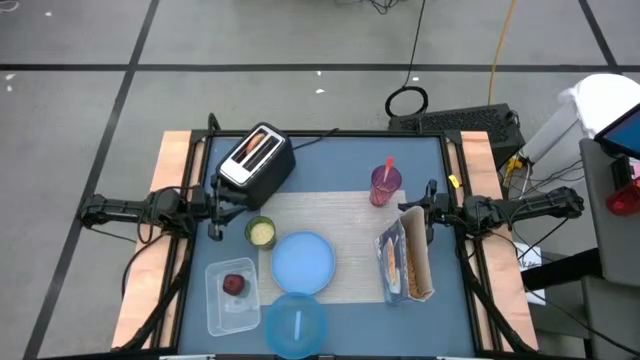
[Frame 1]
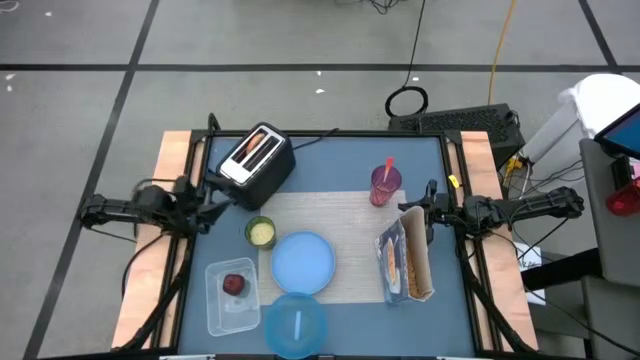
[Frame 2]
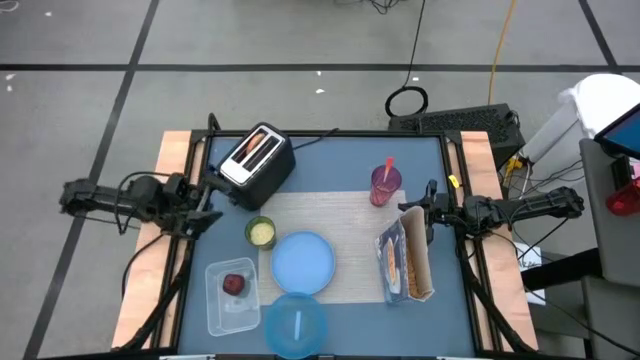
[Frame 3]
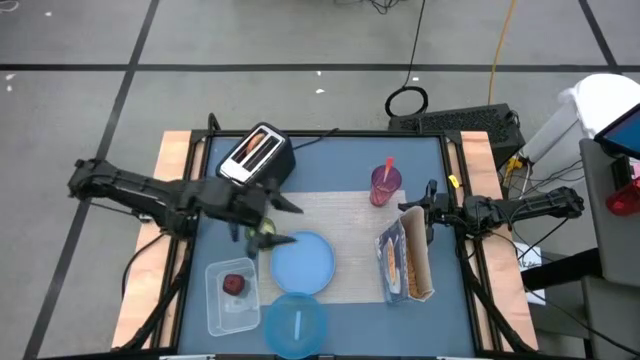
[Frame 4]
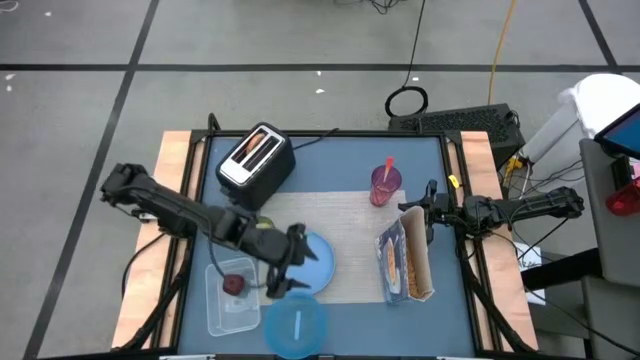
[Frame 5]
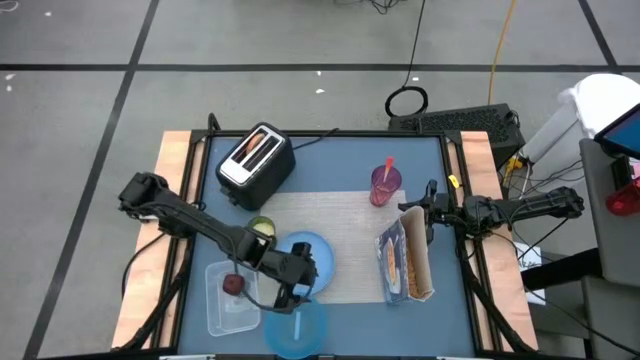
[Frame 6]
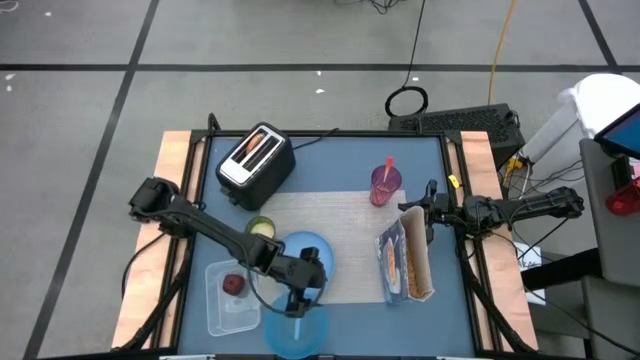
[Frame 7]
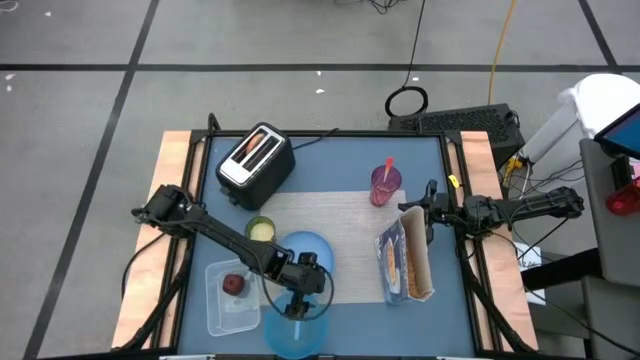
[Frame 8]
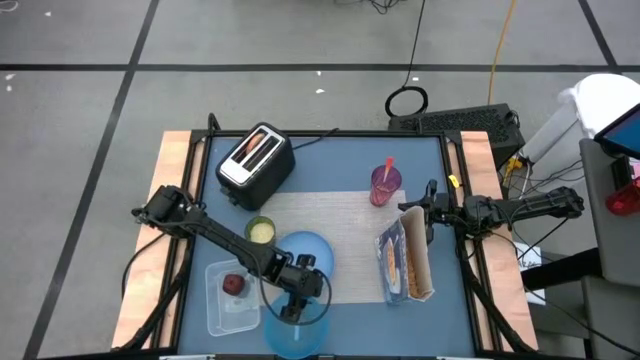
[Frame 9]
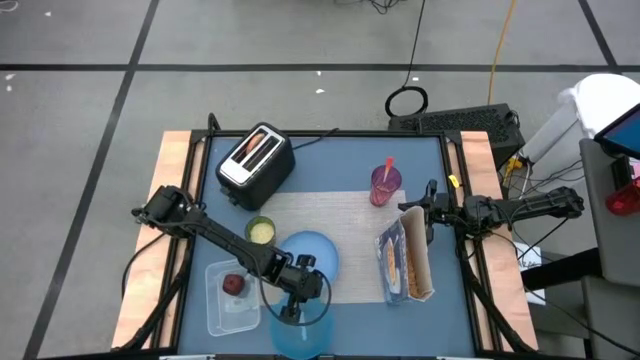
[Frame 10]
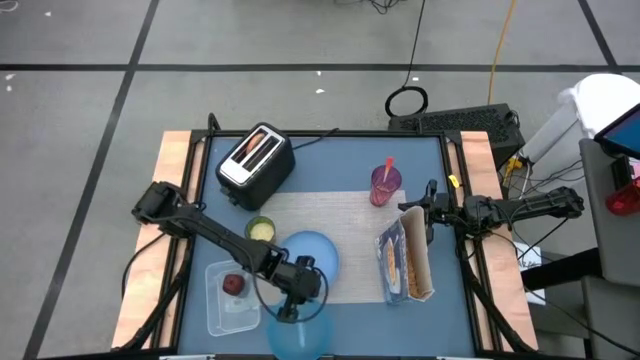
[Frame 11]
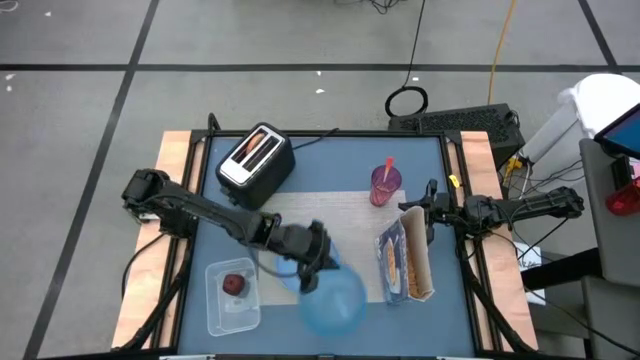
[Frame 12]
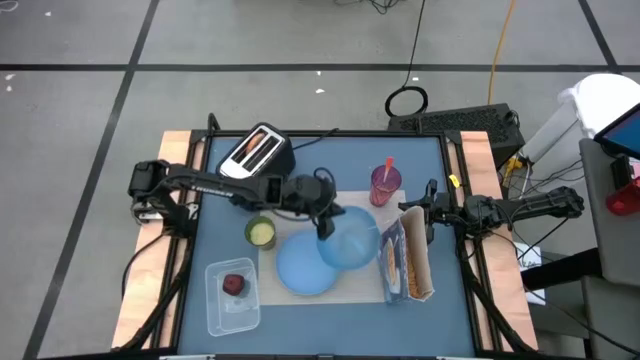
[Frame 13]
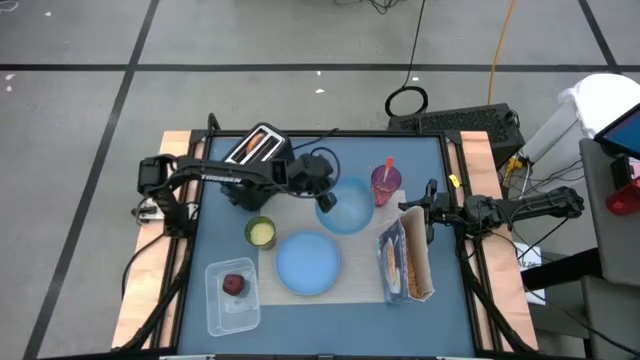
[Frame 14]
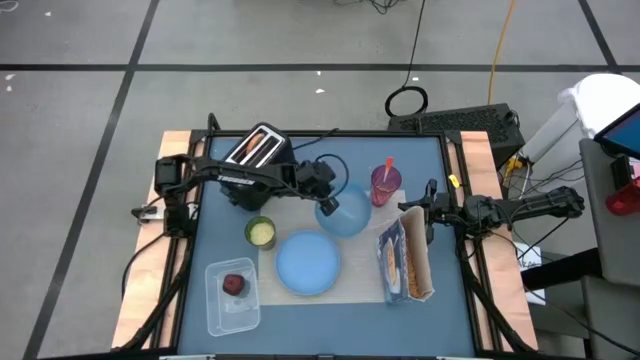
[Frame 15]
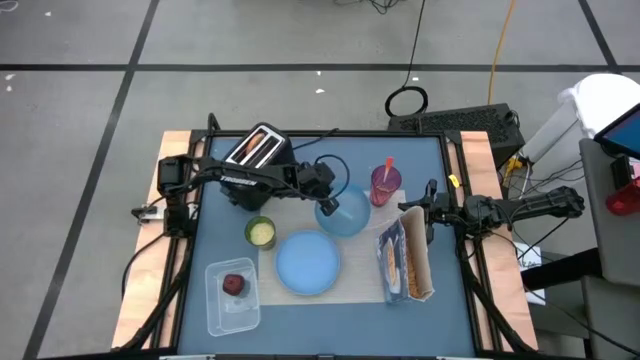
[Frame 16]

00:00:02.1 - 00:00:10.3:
Task: Arrange a breakfast setting
Put the light blue bowl on the gray placemat

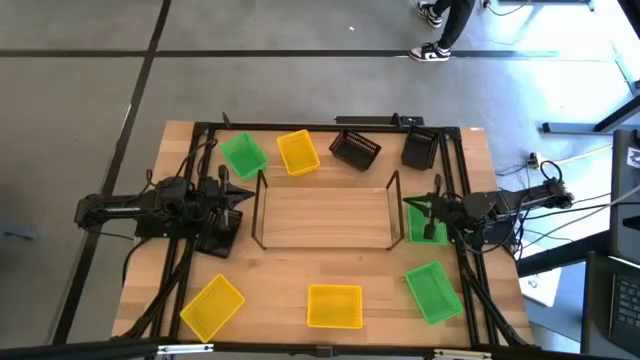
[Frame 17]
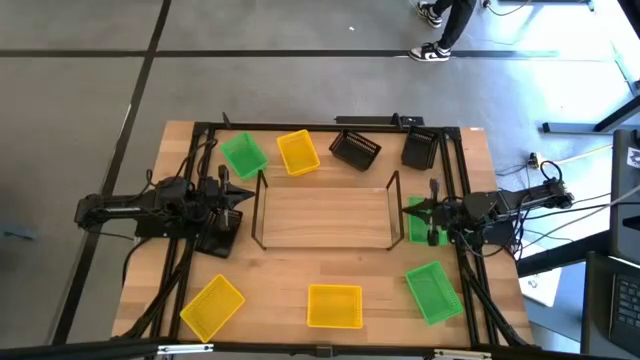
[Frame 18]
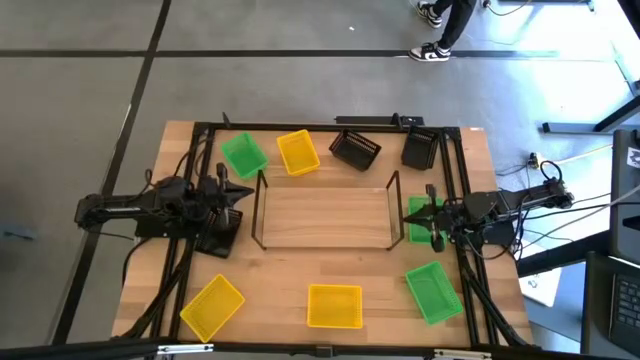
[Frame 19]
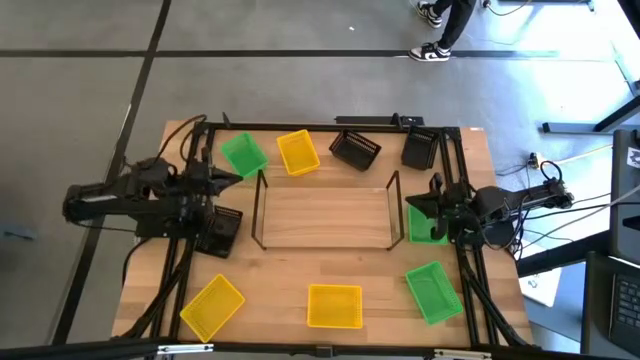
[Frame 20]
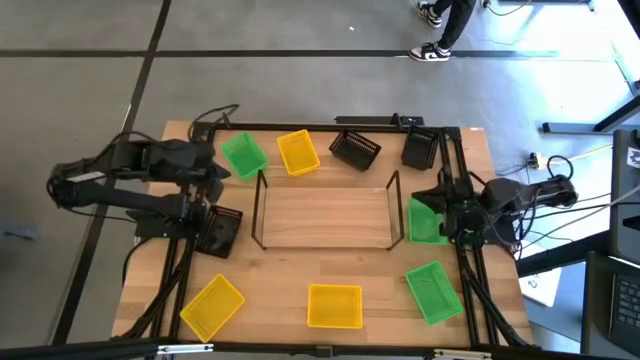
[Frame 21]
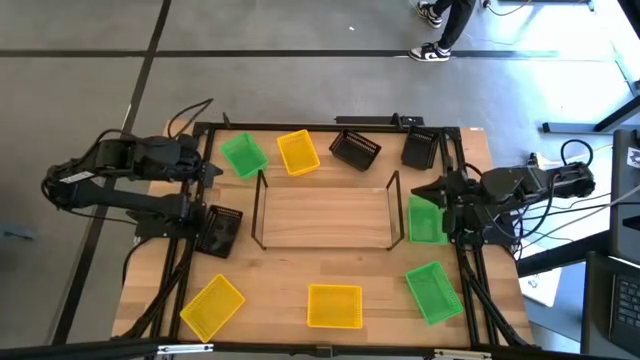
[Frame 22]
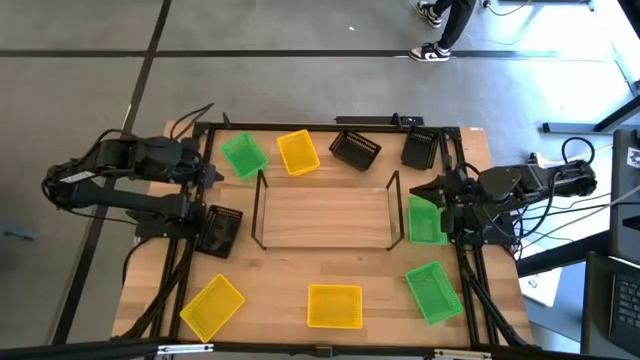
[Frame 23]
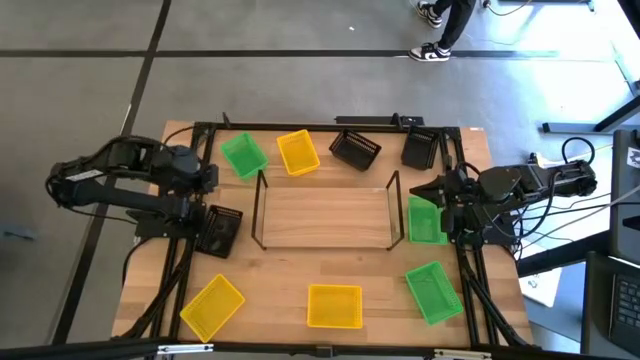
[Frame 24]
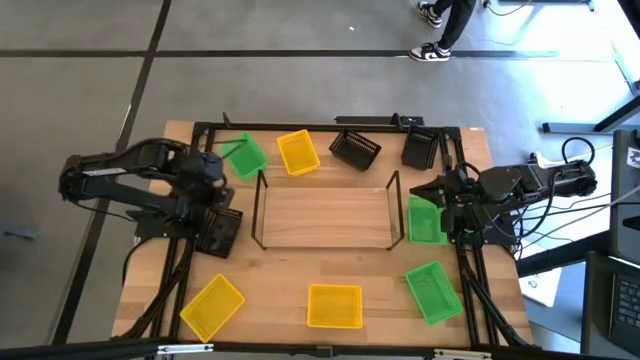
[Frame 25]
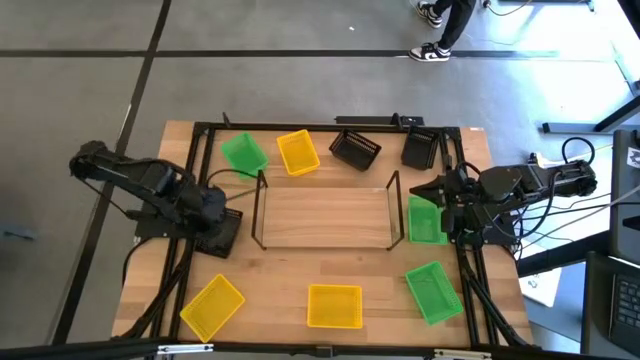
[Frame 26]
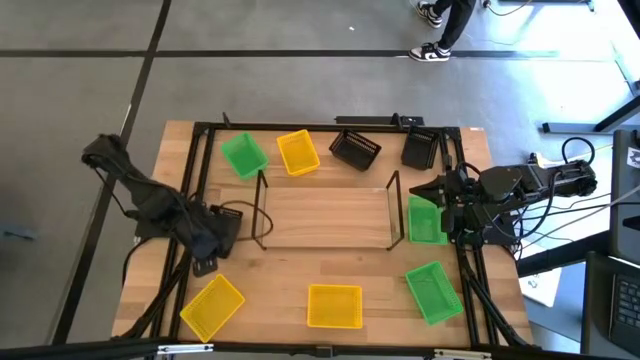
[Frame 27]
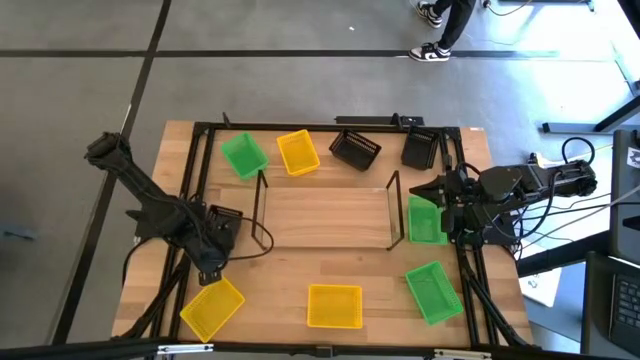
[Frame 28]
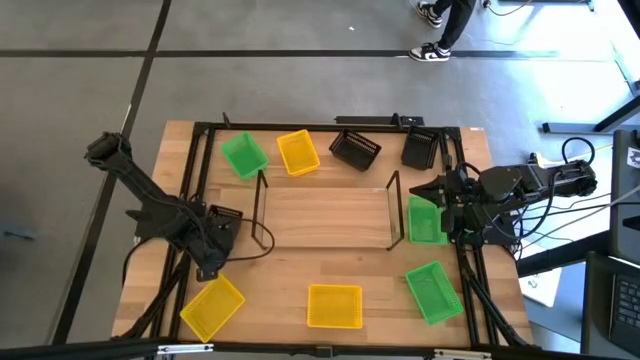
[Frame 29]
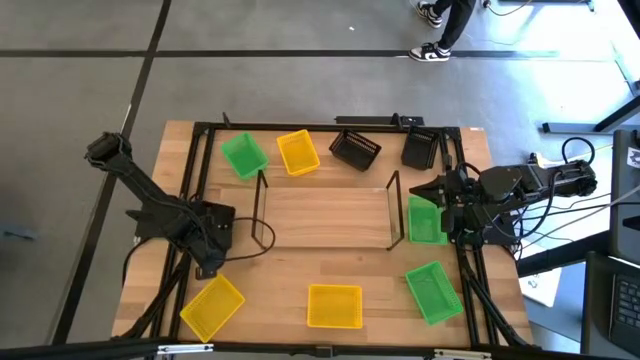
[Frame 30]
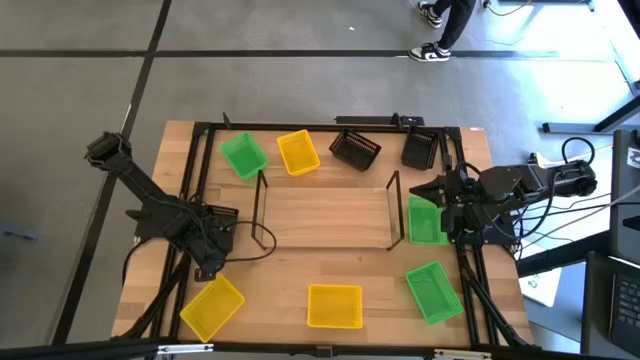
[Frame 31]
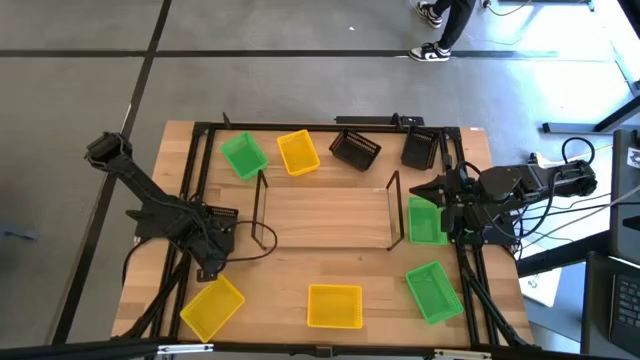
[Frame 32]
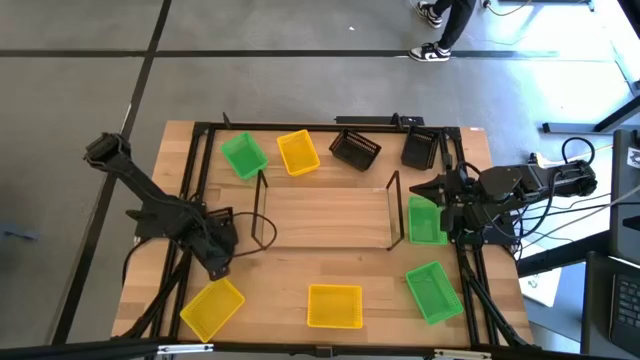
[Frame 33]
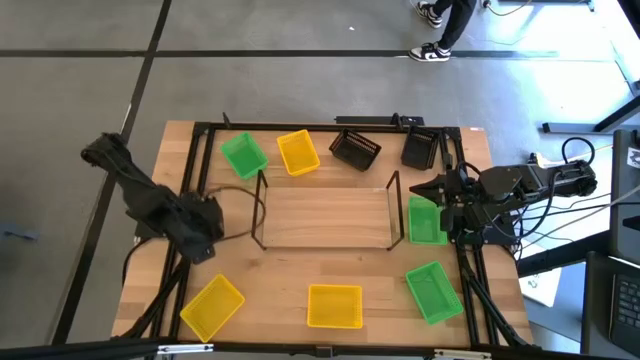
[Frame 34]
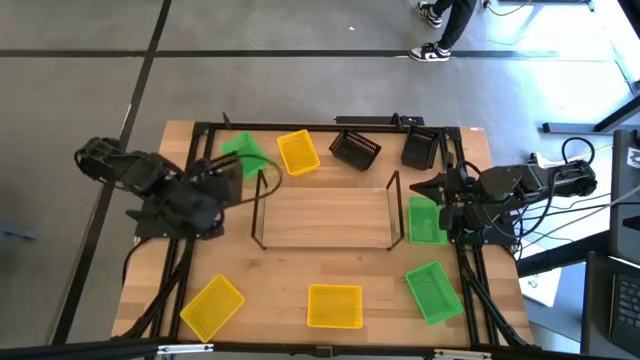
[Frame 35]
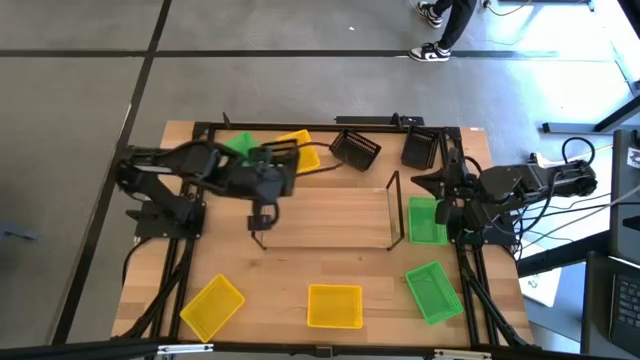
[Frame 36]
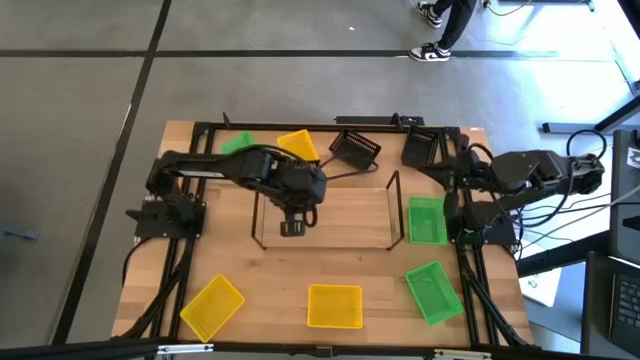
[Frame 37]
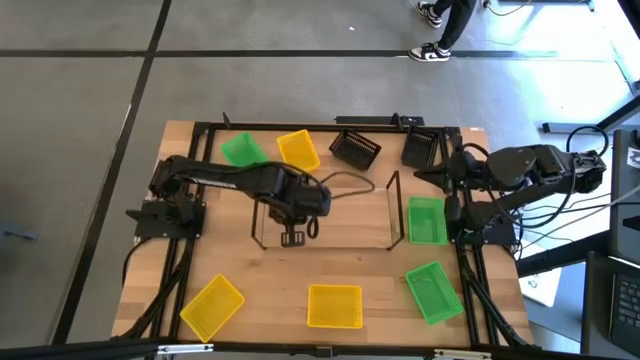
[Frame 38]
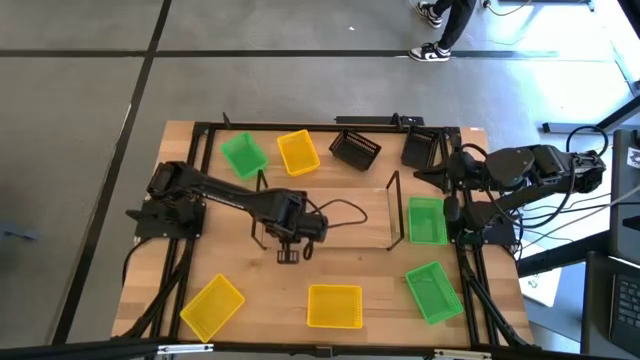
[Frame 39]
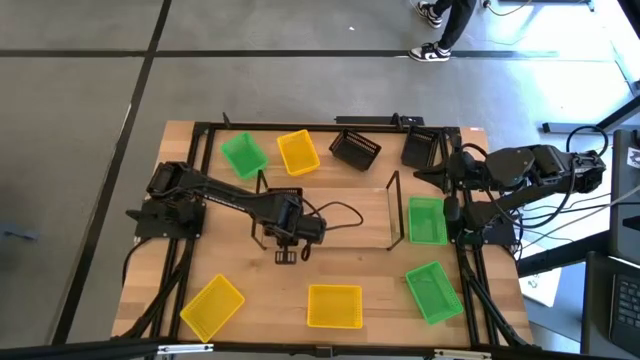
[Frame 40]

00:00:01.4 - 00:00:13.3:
Task: Stack baskets on shelf by color
Put the left black bin on the shelf
